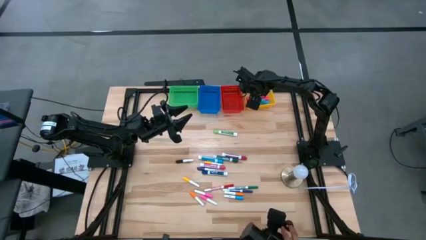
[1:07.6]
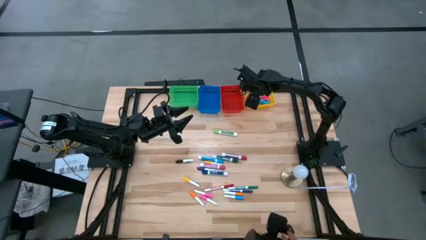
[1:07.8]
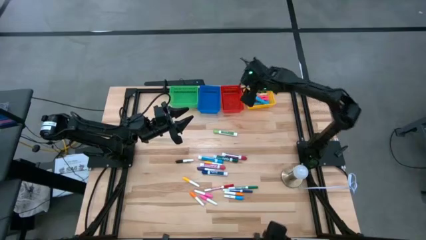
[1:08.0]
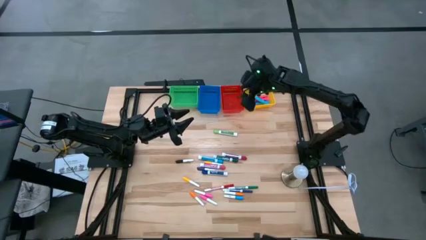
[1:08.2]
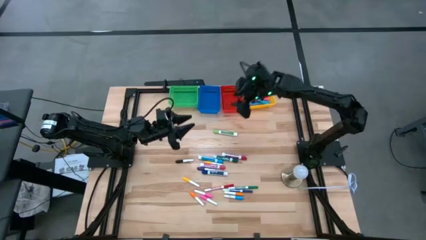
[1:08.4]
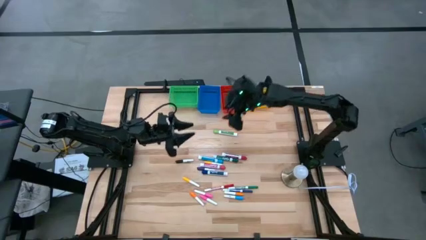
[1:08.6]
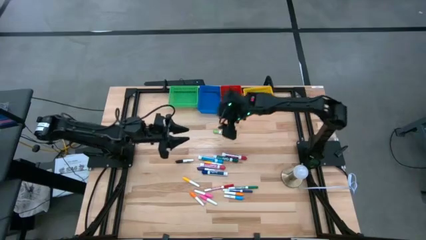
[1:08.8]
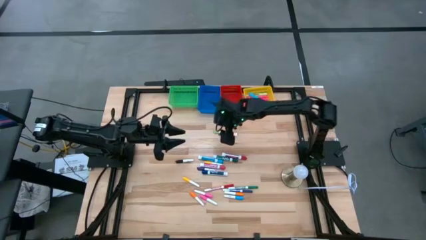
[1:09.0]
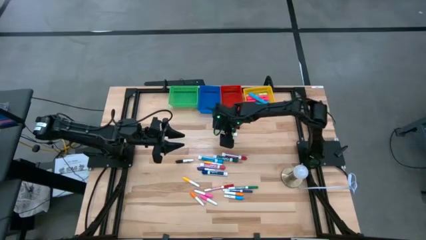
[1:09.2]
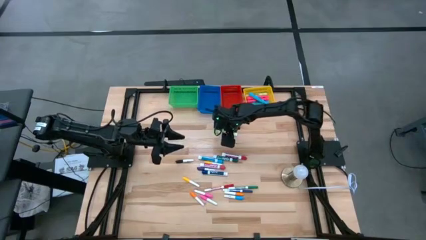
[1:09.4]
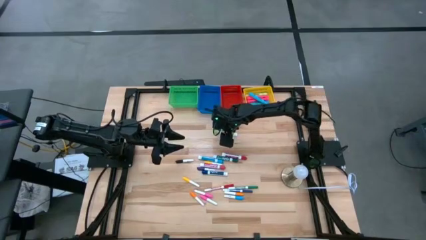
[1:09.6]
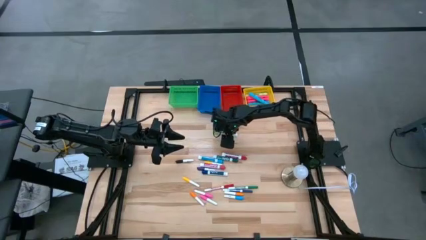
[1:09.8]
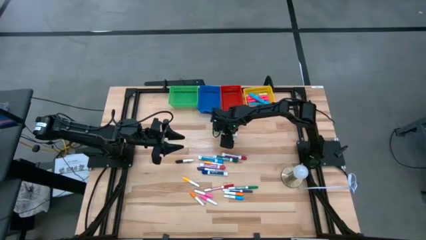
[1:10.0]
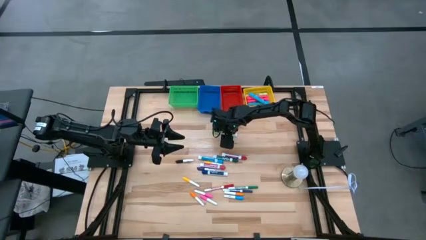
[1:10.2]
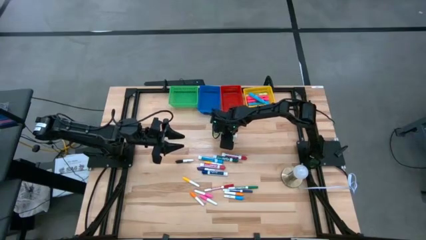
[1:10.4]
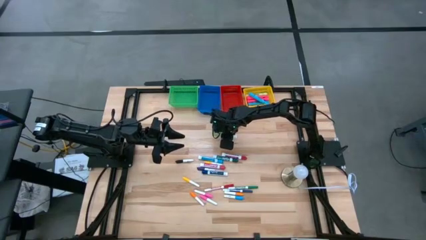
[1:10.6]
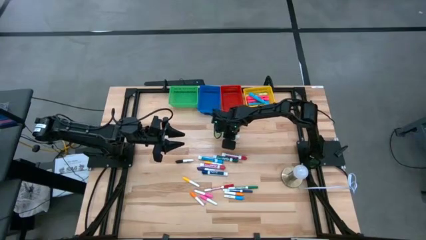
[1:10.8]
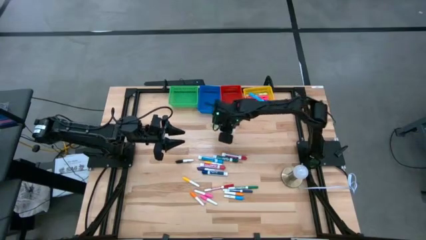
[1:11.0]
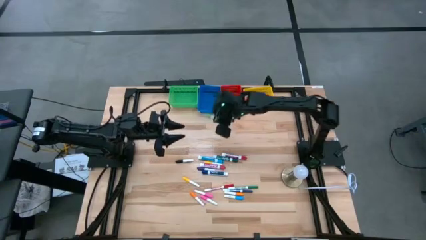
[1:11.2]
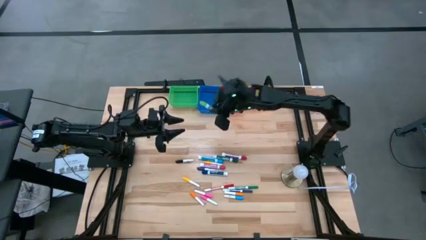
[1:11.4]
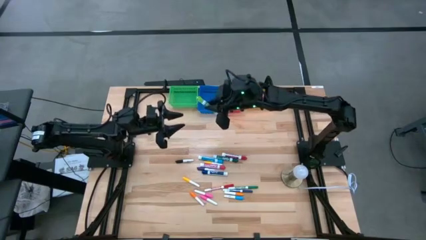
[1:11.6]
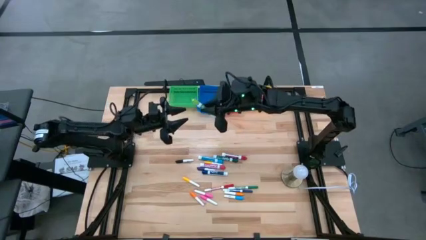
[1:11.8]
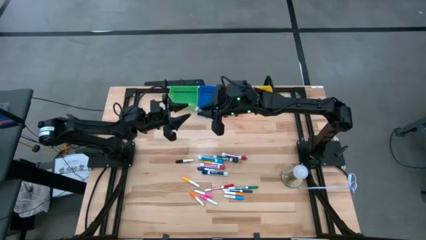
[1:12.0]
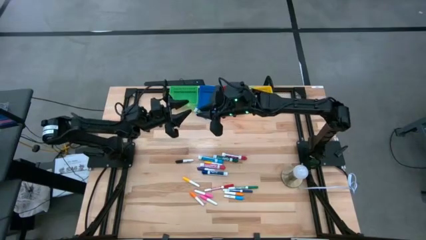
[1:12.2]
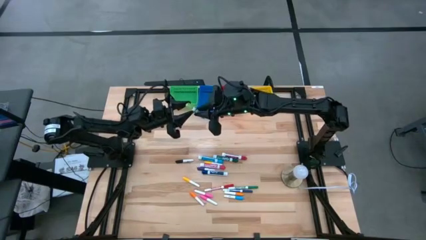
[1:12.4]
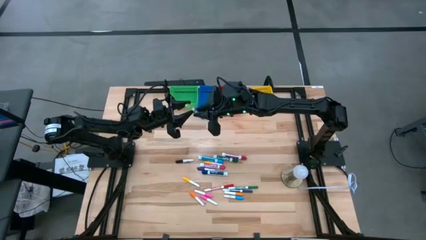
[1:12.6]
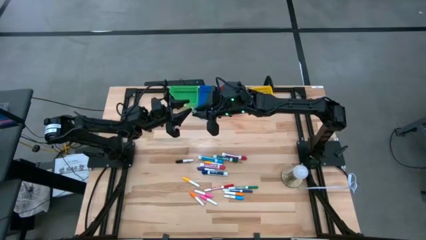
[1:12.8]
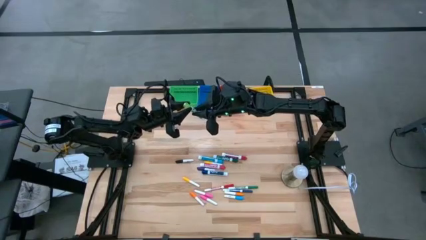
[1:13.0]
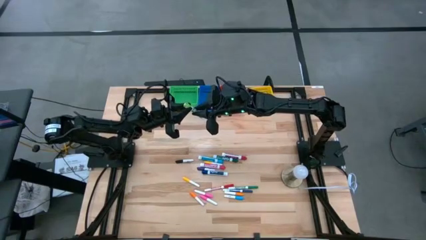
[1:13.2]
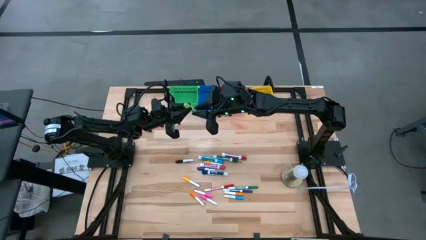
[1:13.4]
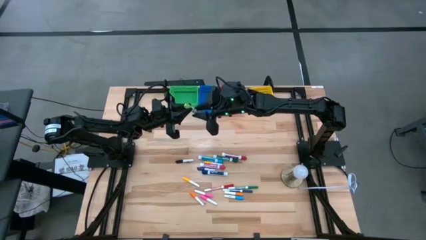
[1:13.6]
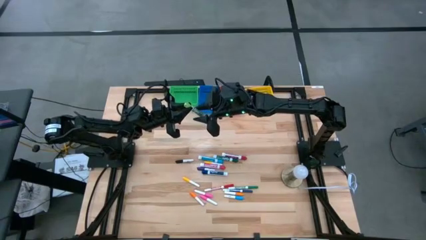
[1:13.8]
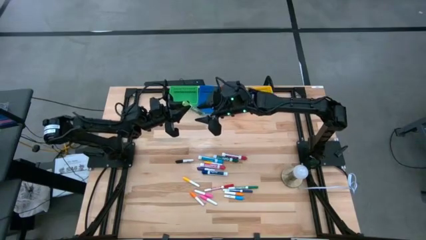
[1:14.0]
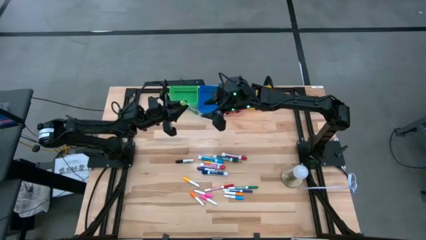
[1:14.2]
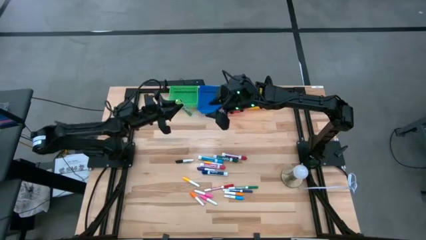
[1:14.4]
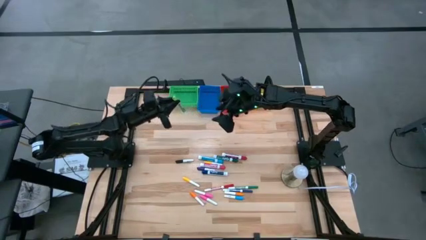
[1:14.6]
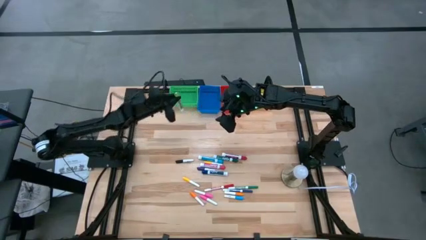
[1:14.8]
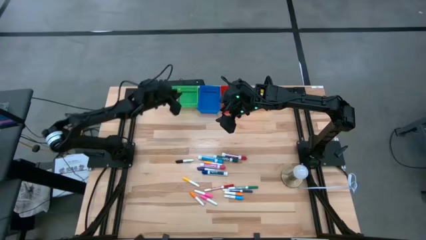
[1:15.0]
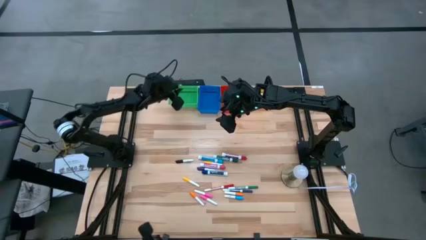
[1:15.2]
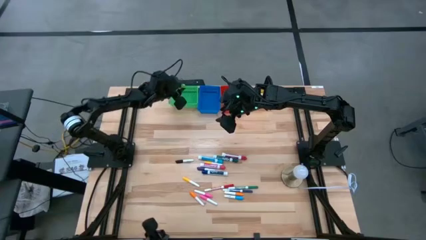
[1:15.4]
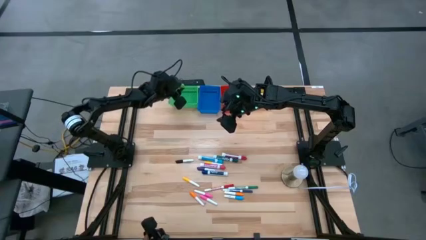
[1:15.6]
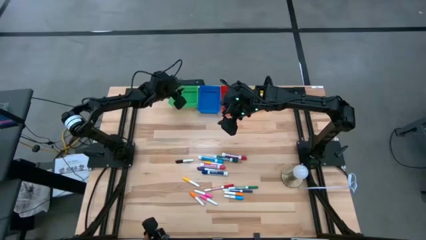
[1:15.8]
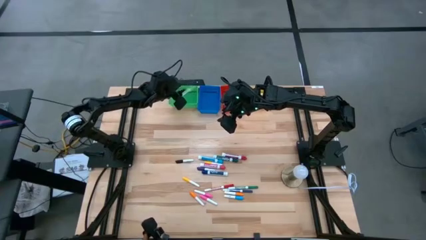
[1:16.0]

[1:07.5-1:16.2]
Task: Pick & Place Markers
Put the large light green marker pen into the green bin

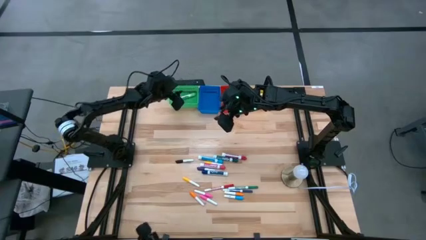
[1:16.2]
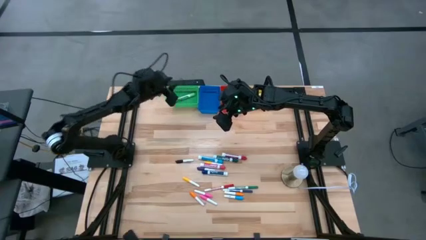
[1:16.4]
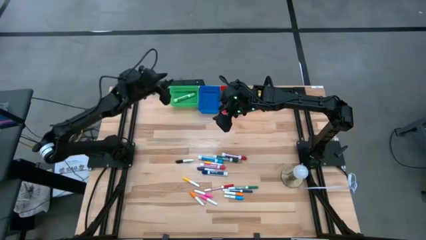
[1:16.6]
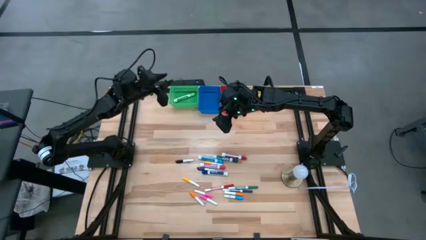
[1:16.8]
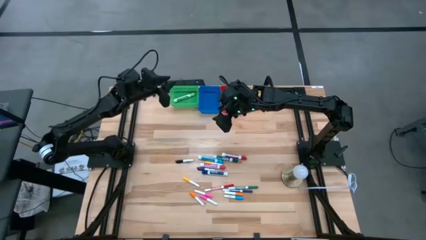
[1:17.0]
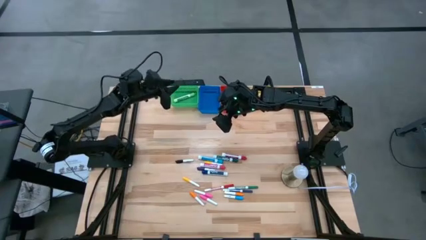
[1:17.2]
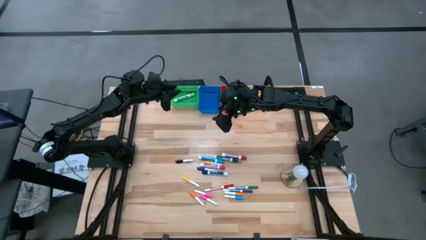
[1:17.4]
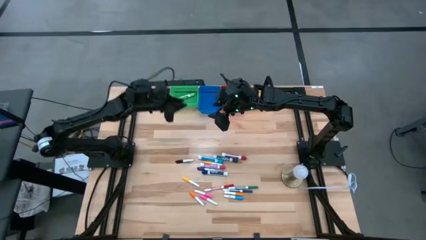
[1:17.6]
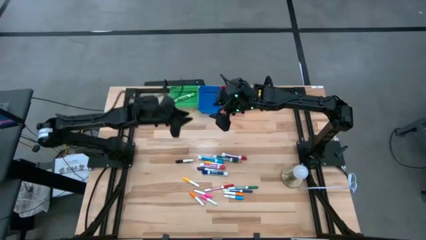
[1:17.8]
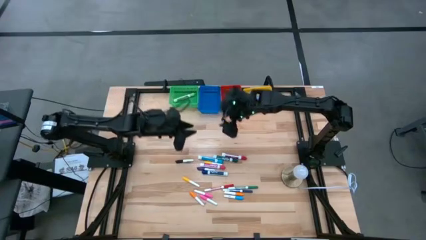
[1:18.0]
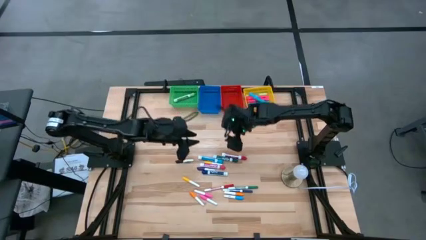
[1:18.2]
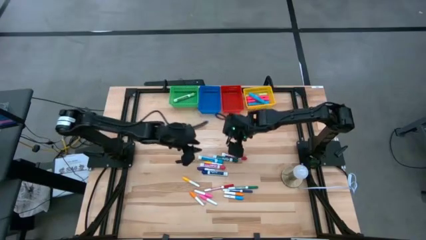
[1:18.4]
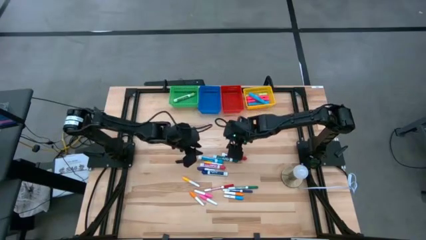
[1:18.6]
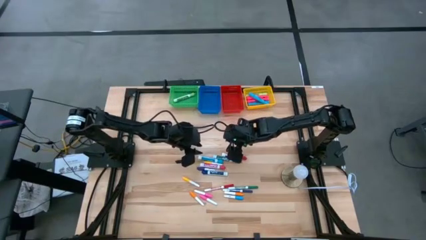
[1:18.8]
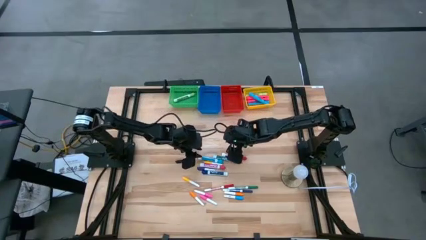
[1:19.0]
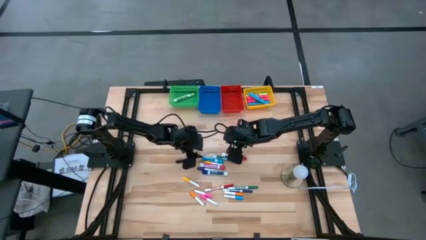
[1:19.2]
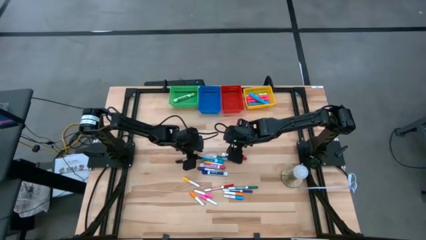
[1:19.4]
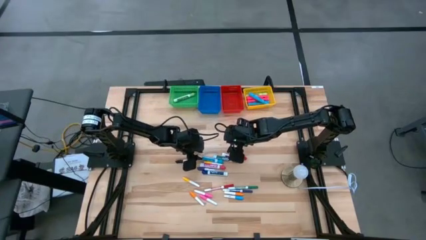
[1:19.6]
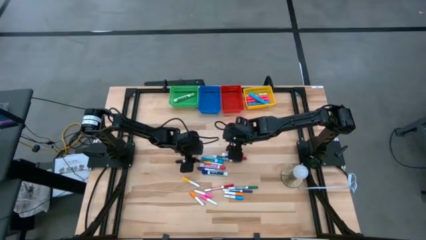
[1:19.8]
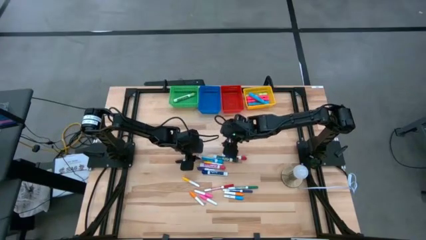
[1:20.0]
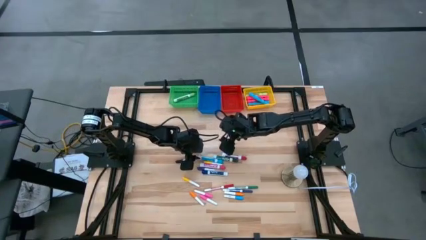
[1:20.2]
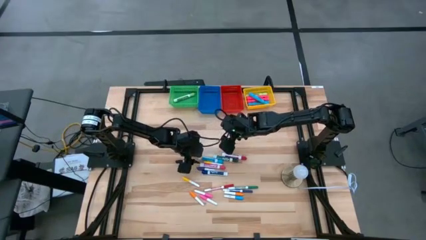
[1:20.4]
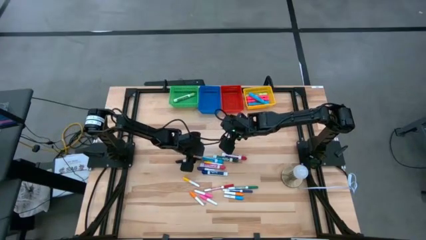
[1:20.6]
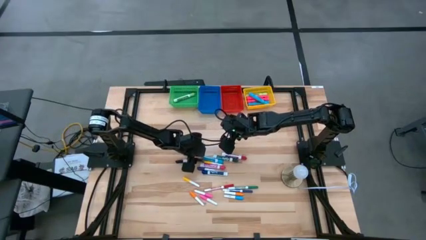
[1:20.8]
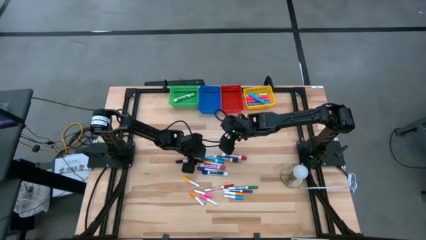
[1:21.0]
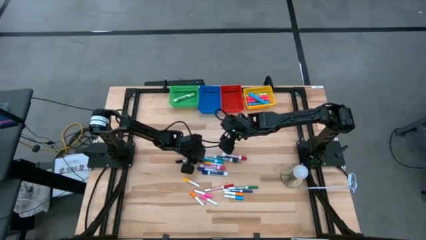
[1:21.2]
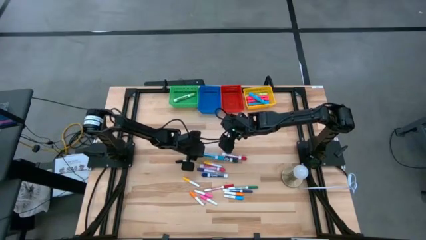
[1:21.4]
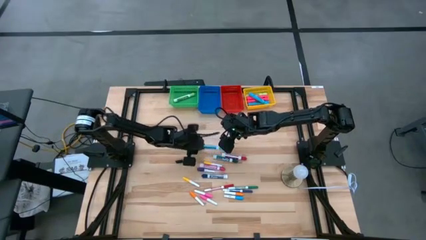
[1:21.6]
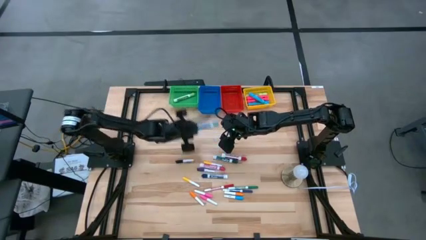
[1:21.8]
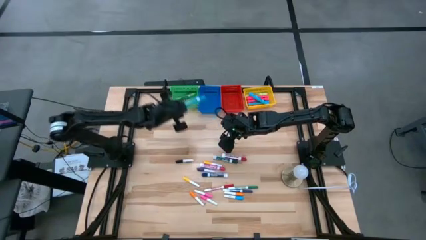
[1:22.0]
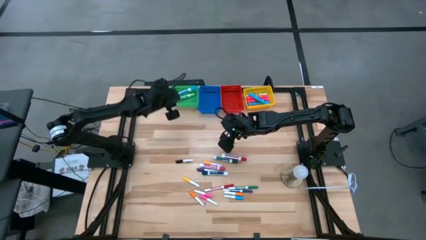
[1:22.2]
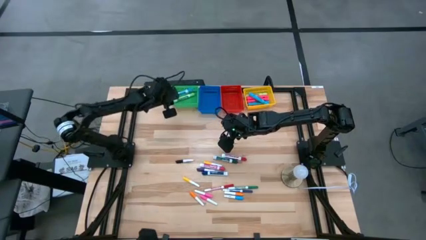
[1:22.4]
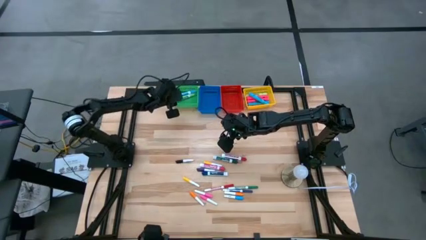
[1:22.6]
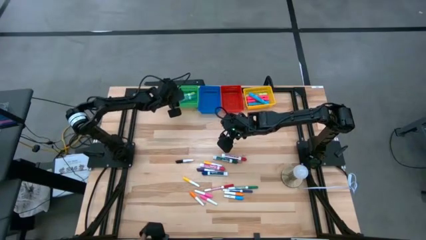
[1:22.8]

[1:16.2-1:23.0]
Put the large light blue marker pen into the green bin

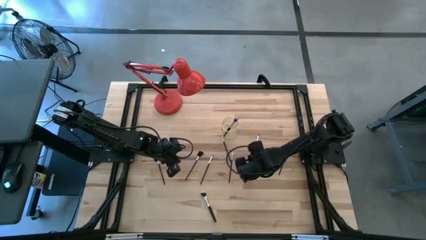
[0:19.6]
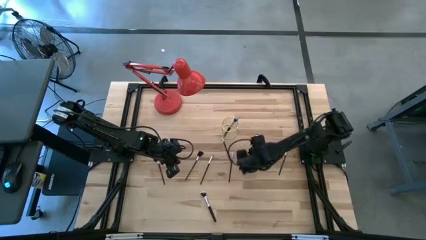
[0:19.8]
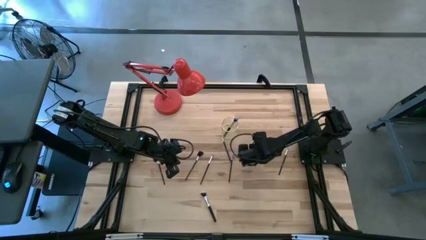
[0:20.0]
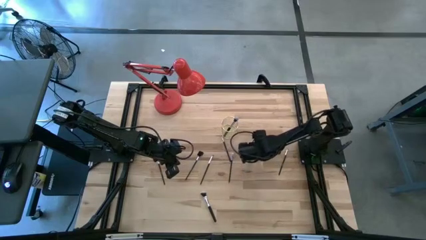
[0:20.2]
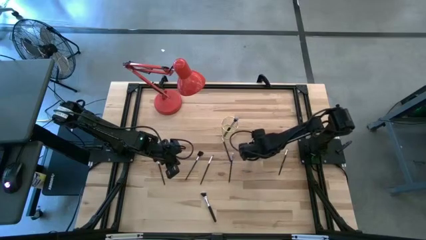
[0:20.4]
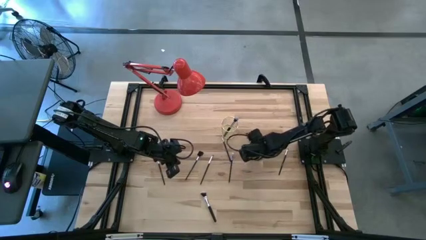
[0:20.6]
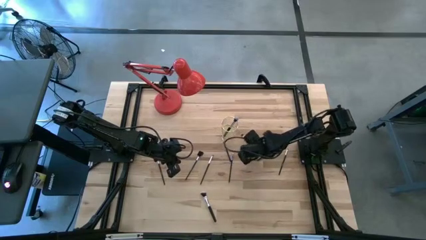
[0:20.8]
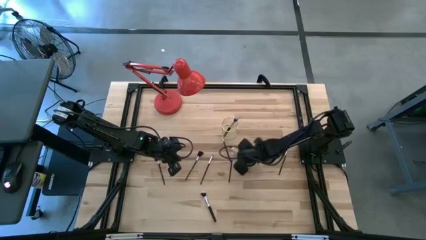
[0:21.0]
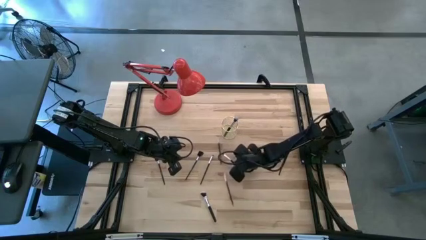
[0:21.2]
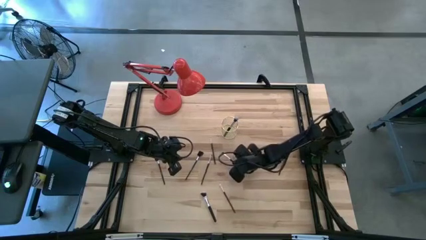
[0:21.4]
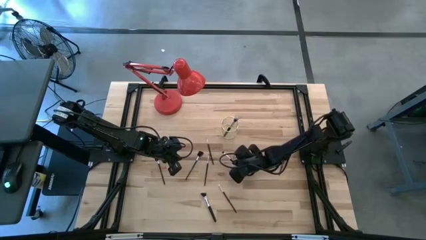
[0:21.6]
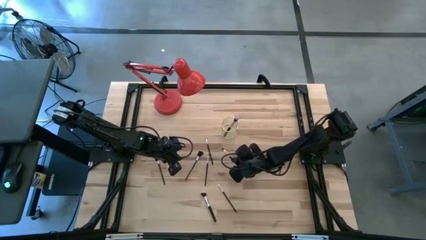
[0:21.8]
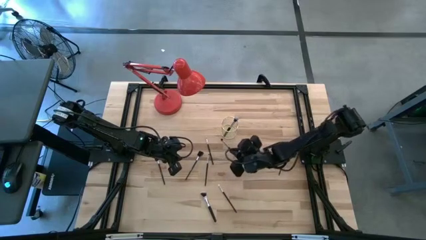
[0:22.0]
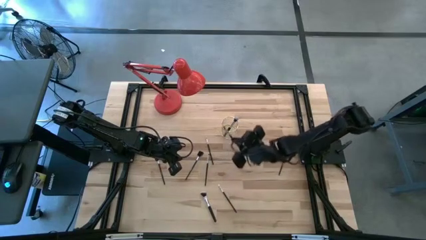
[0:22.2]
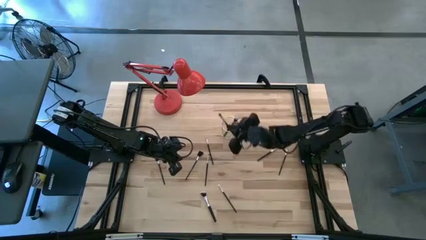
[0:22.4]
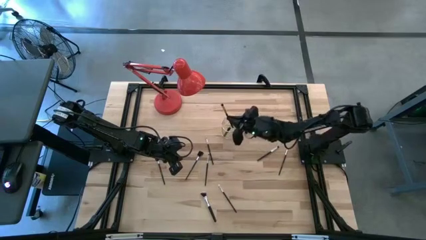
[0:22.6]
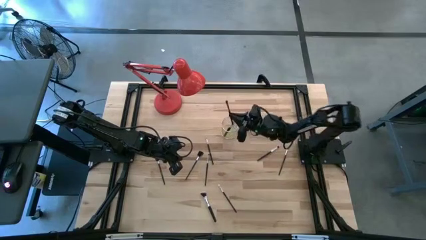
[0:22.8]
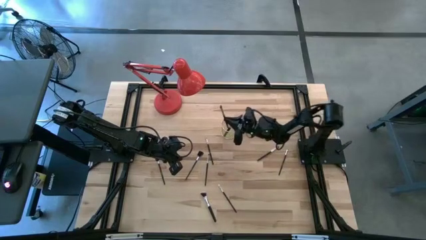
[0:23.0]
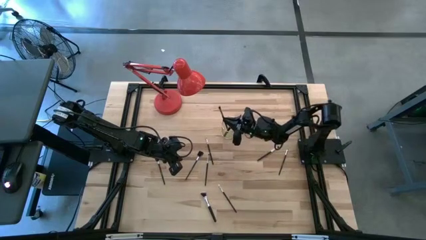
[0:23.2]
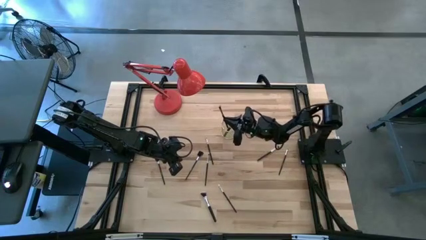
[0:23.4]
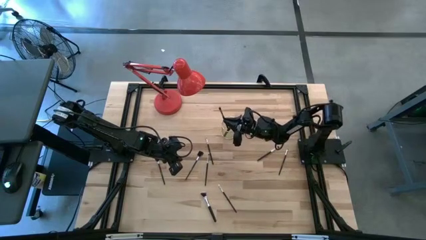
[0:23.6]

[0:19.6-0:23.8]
Task: Put items in baskets/containers
Put the black eyeshadow brush into the yellow container
